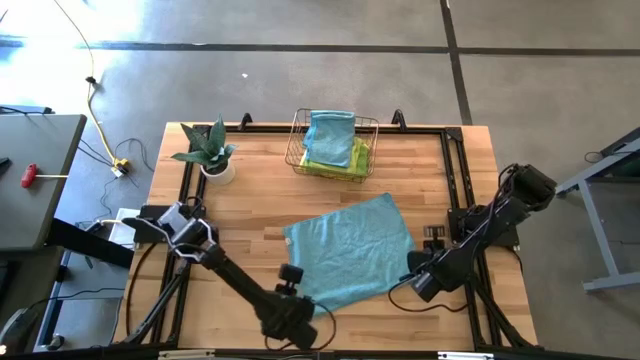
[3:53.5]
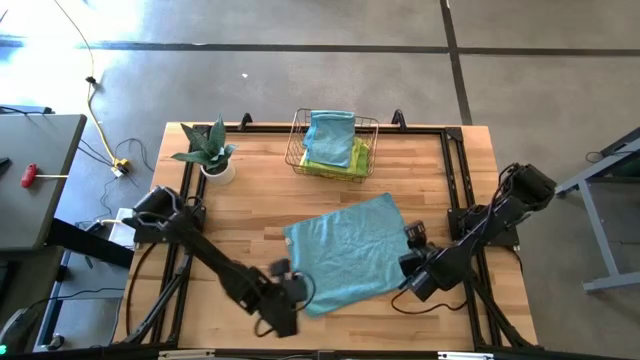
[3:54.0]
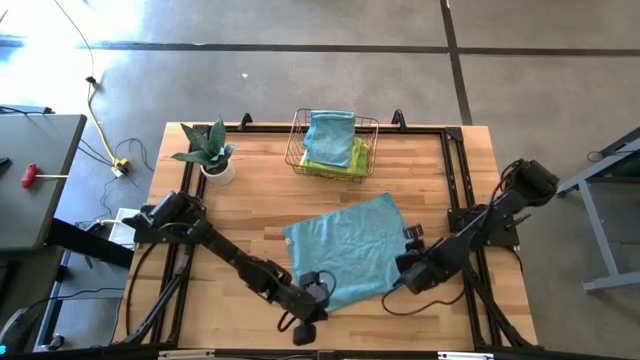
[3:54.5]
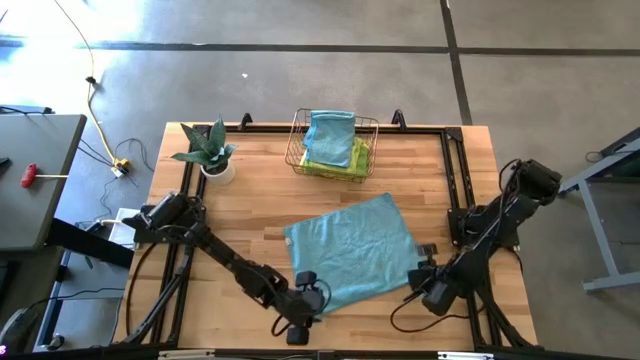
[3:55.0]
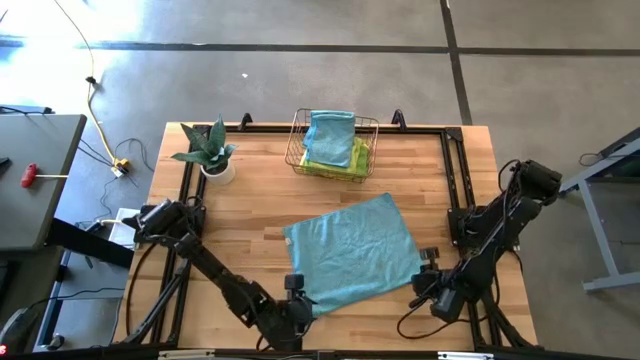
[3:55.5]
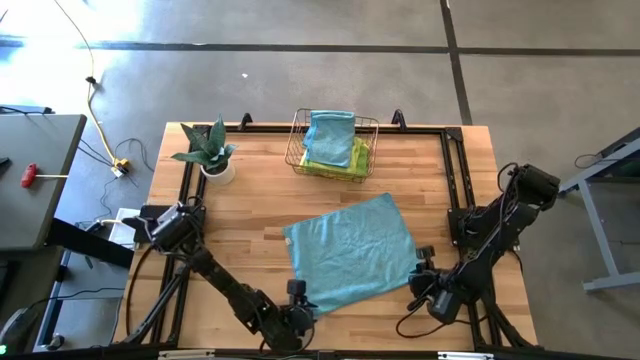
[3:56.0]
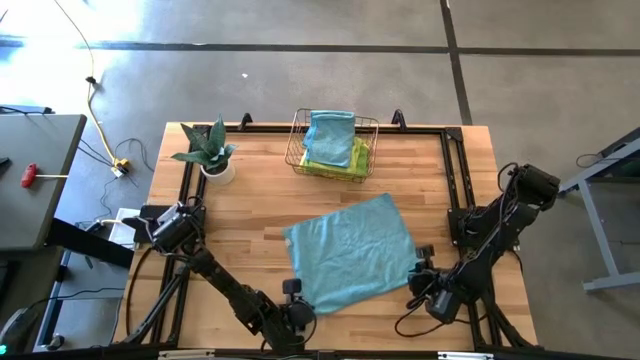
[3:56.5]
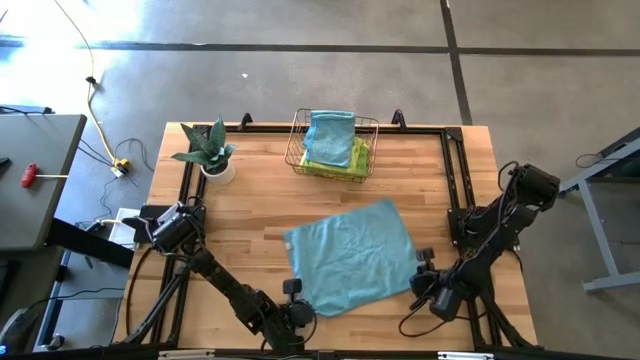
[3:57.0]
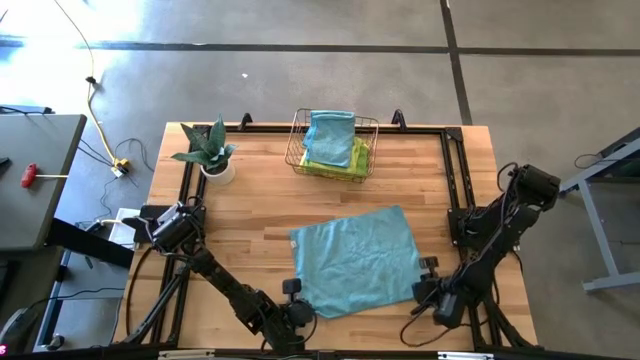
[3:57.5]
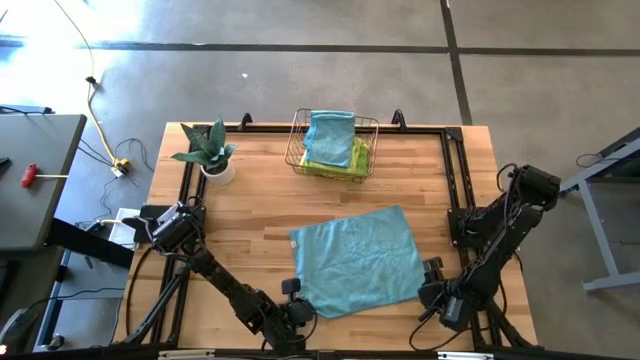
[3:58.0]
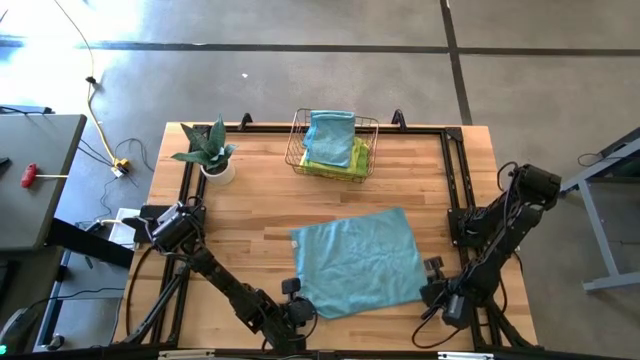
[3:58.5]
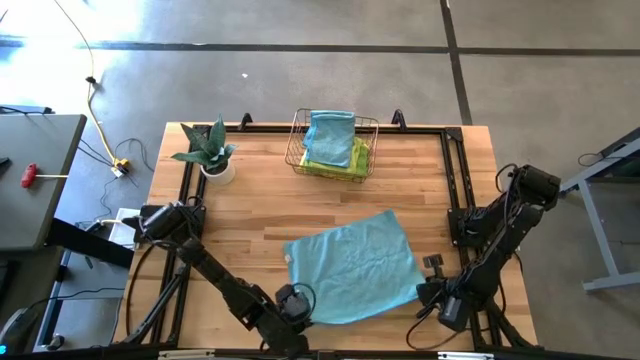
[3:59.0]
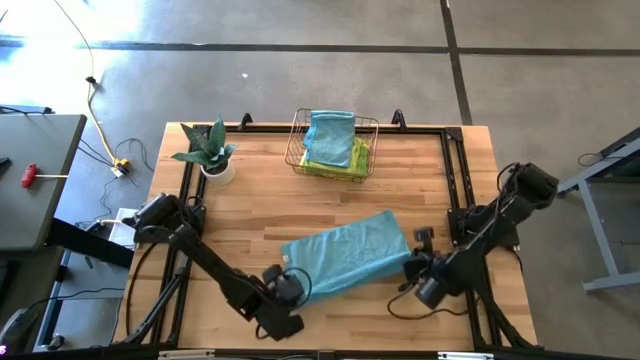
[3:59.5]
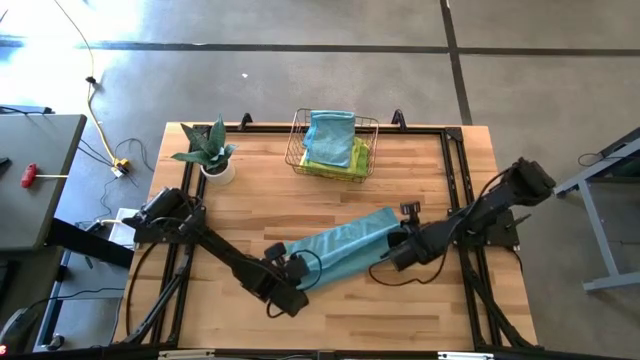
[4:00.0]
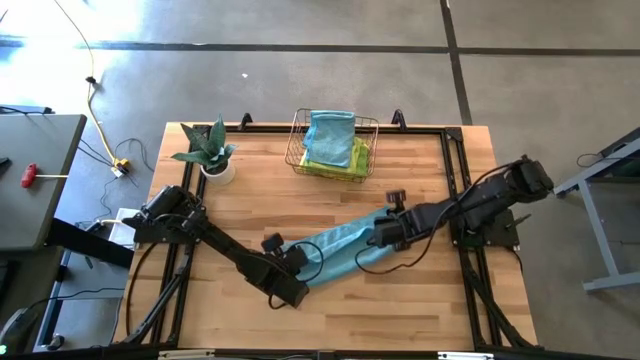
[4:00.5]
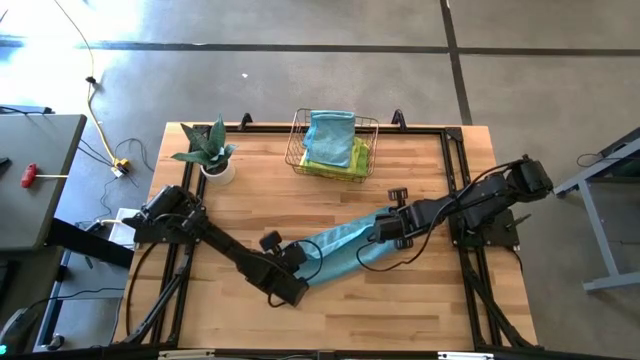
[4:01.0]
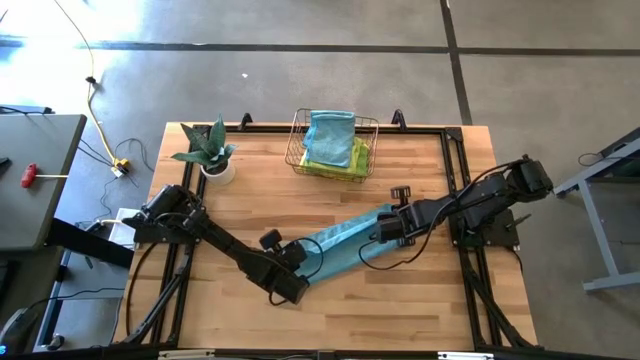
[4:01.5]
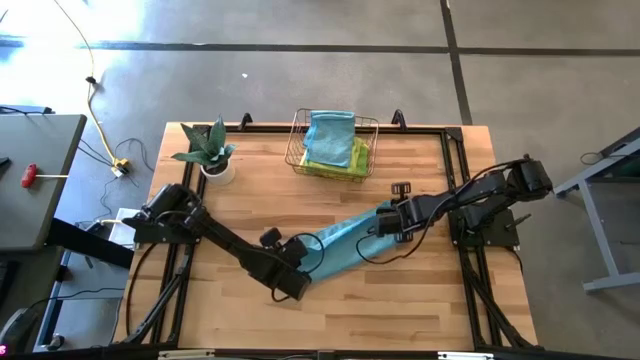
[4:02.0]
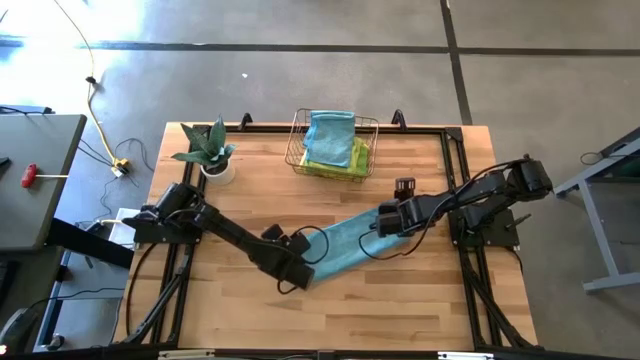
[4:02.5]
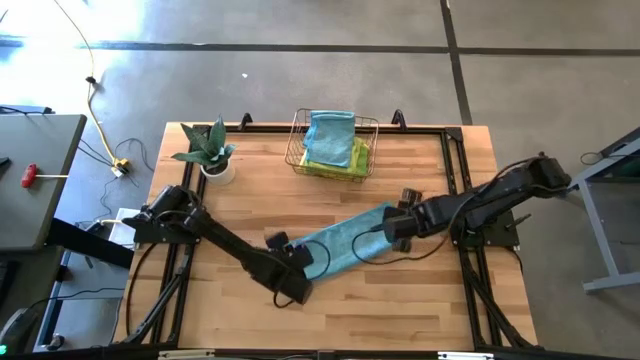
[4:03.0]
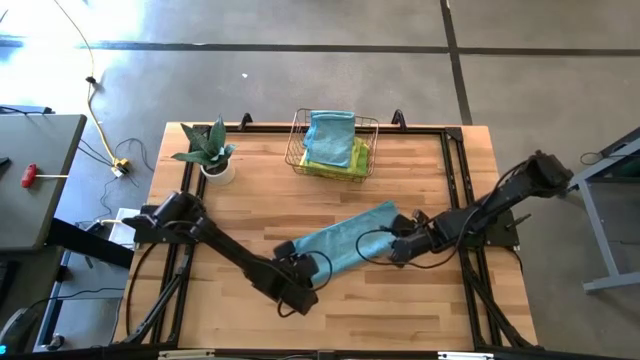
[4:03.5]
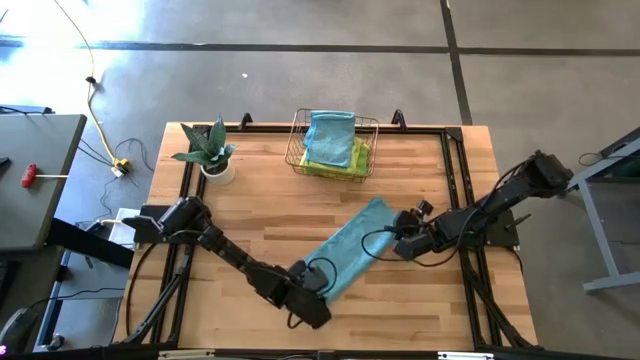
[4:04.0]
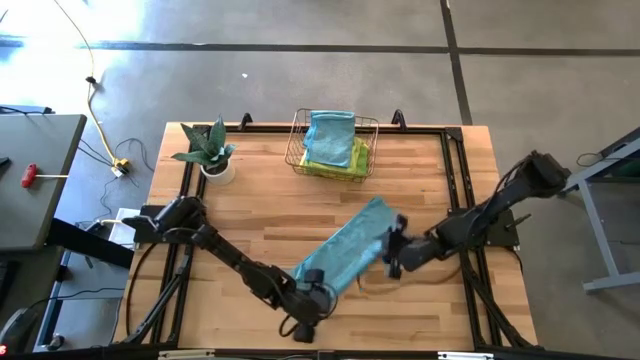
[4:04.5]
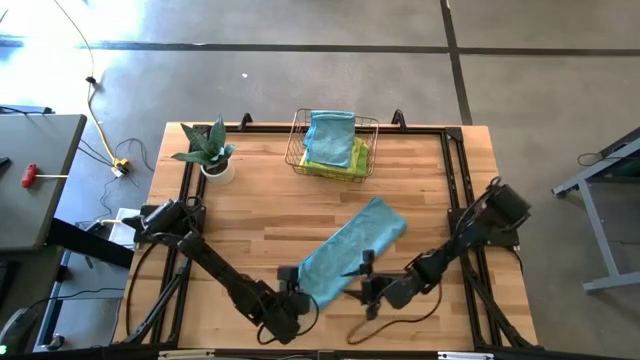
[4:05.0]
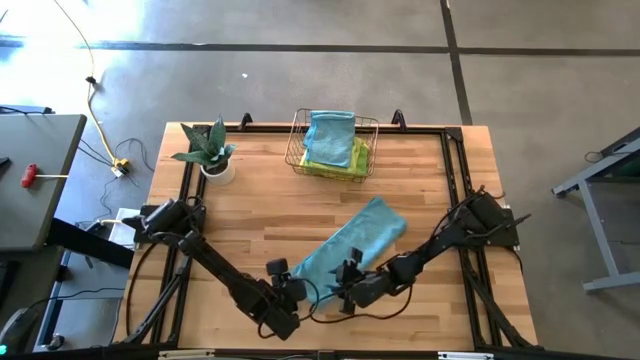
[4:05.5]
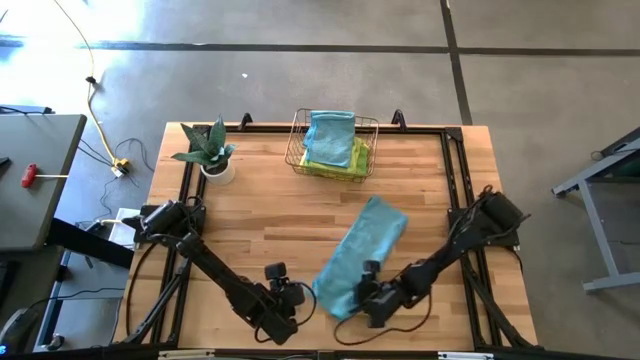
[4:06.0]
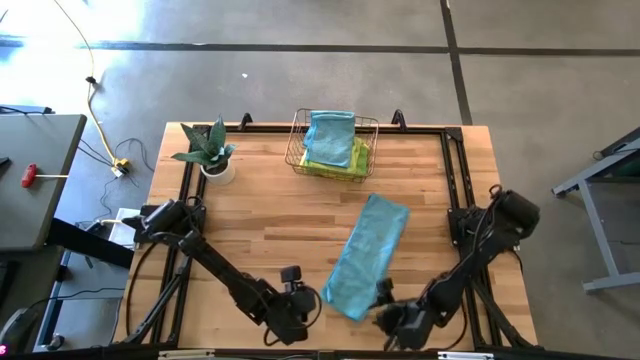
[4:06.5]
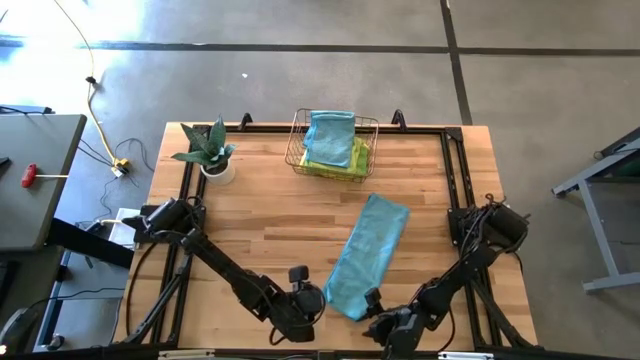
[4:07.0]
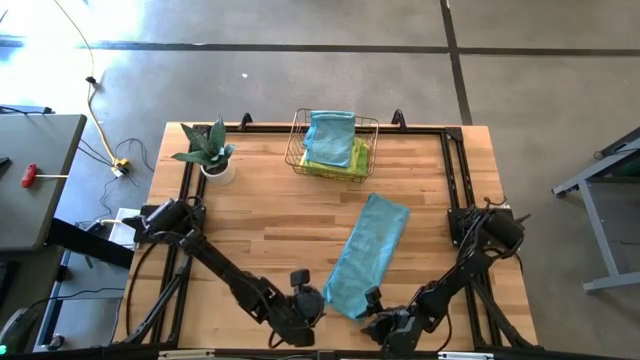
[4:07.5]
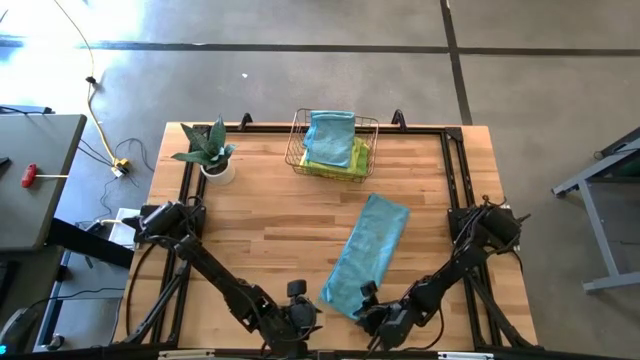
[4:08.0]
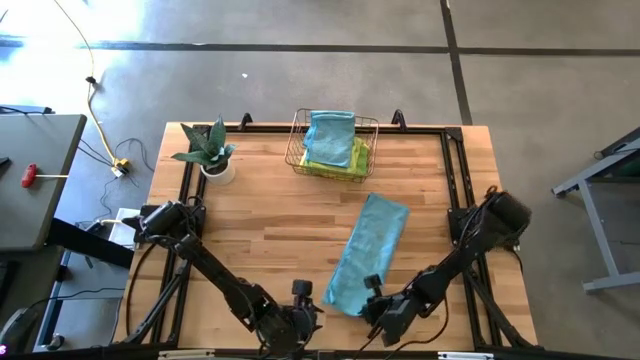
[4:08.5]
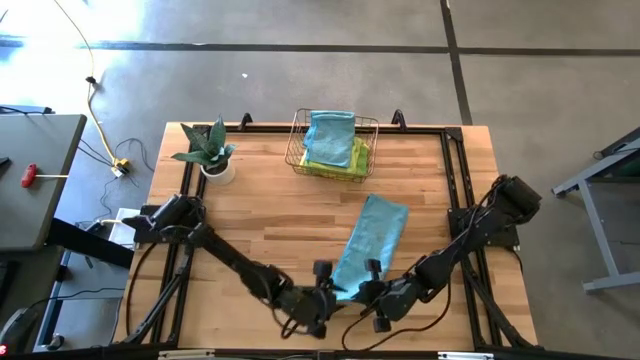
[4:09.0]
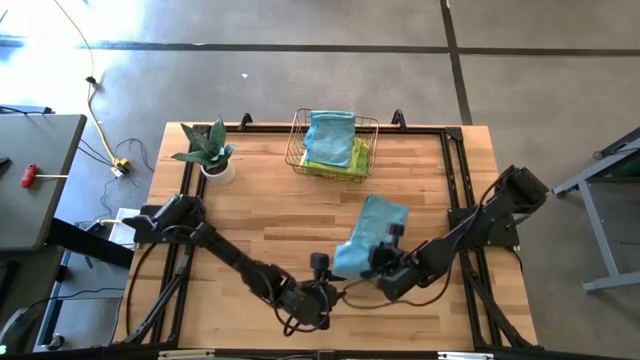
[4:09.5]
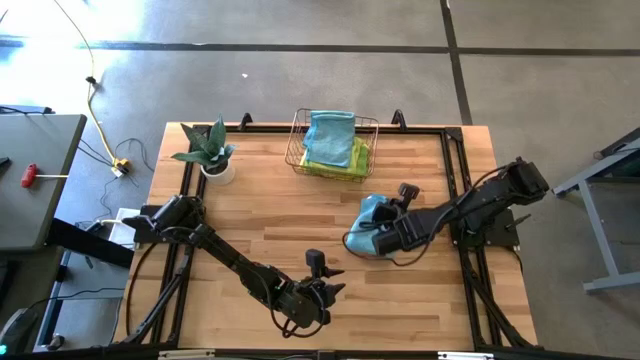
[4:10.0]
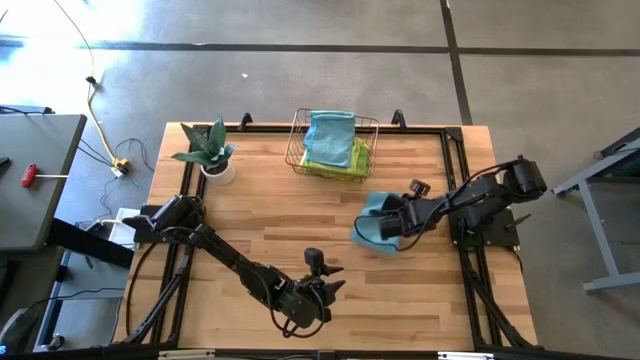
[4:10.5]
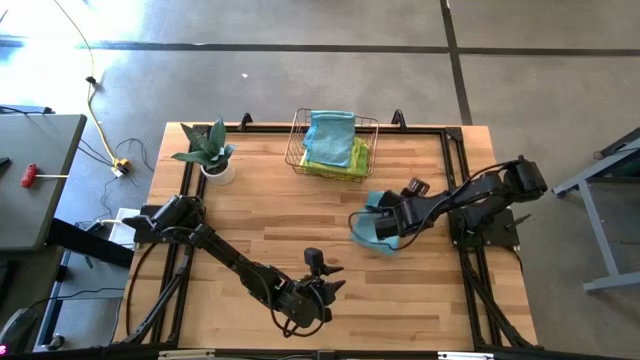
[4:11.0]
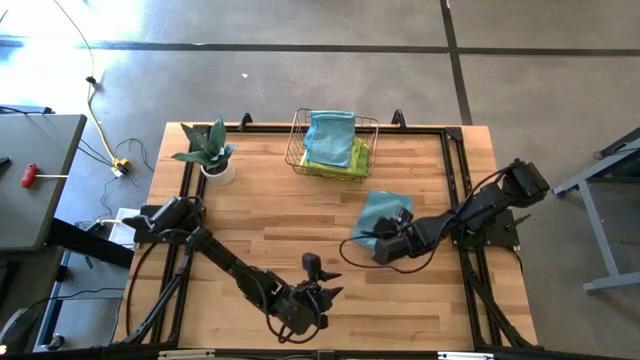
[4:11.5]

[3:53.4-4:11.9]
Task: Fold microfiber towels
Fold the blue microfiber towel

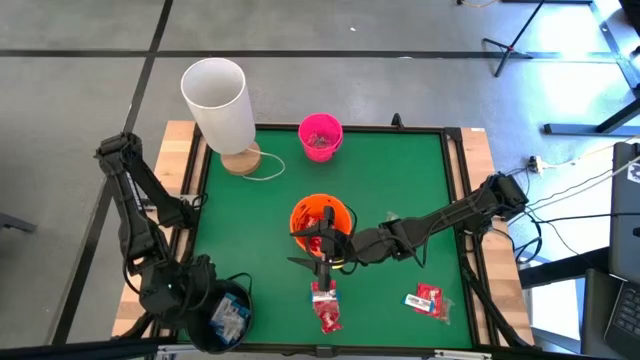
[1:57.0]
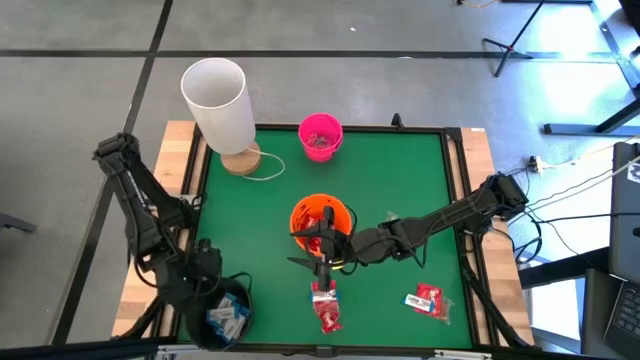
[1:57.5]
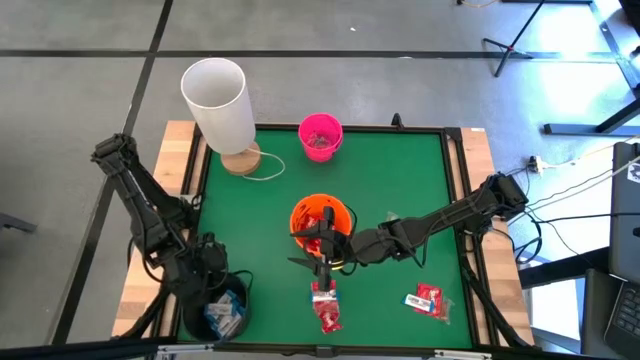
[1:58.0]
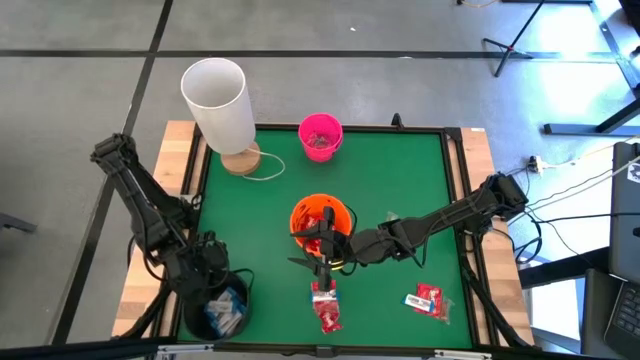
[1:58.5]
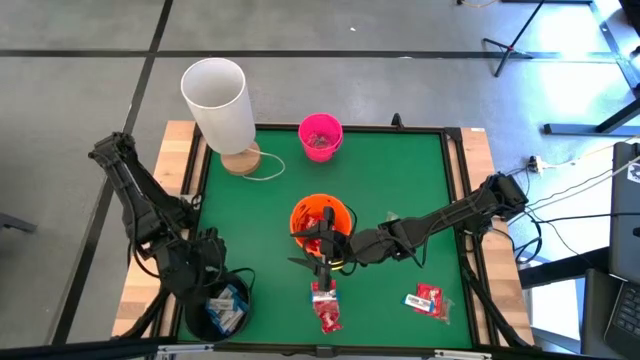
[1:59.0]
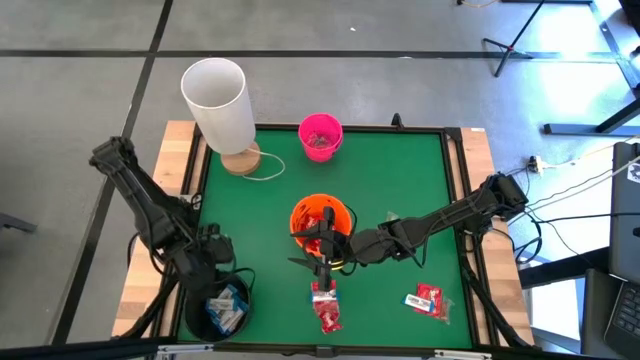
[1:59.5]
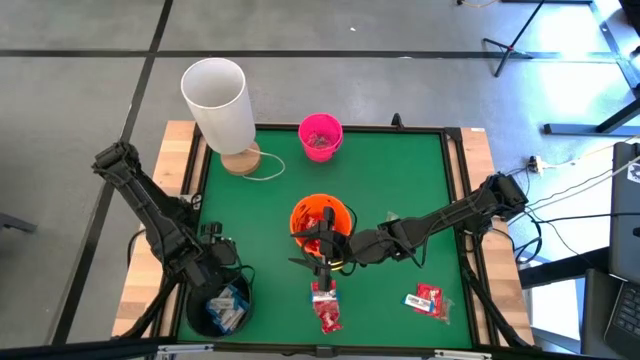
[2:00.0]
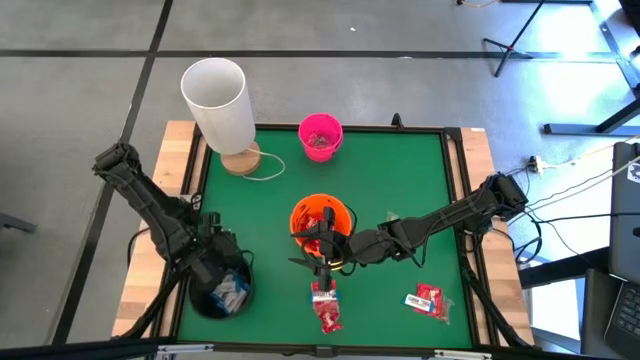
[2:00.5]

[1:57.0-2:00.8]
Task: Sort candy
Adjust the black bucket
